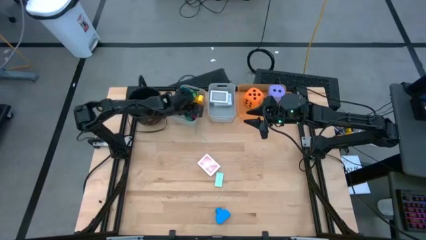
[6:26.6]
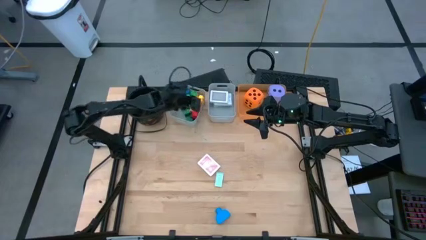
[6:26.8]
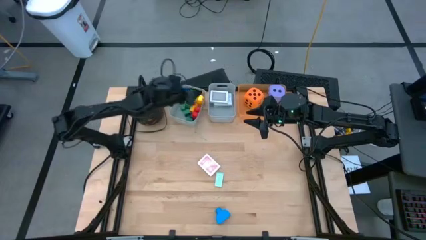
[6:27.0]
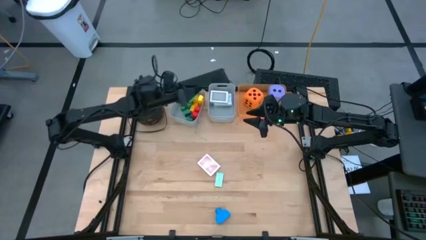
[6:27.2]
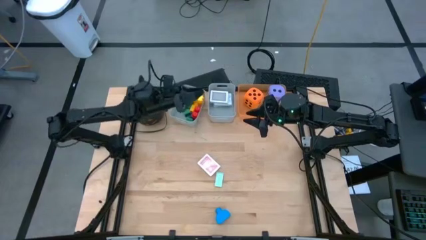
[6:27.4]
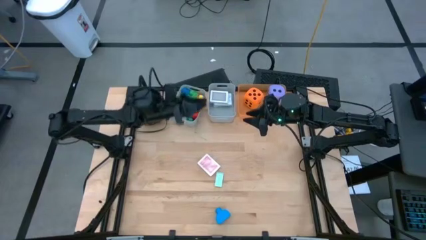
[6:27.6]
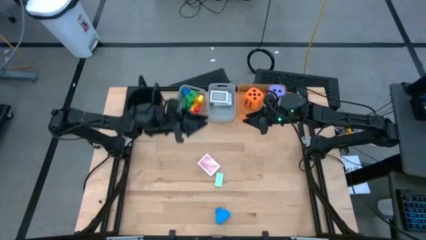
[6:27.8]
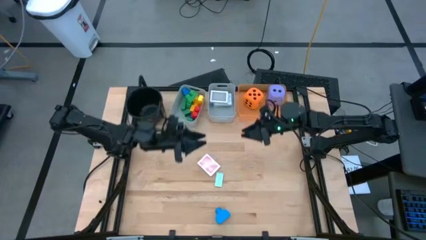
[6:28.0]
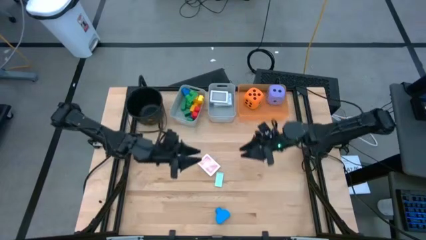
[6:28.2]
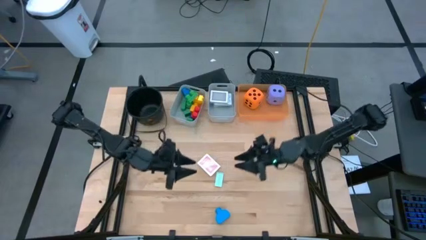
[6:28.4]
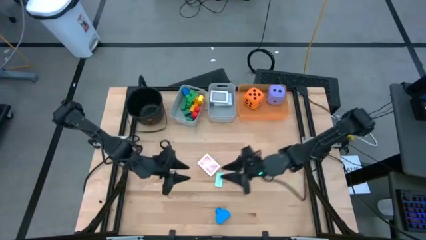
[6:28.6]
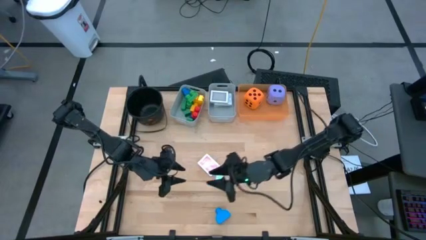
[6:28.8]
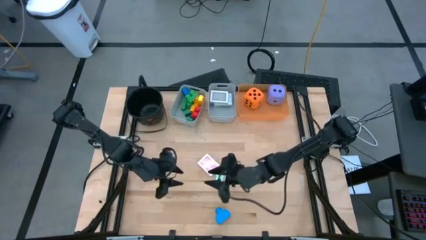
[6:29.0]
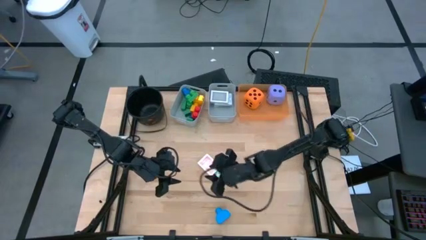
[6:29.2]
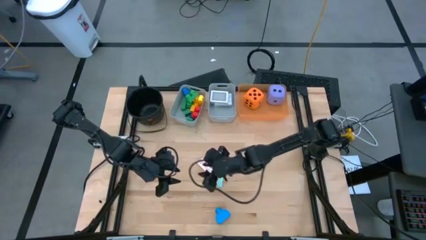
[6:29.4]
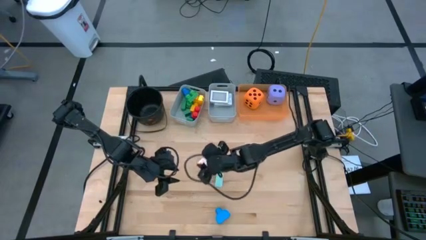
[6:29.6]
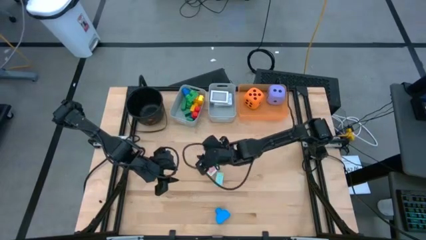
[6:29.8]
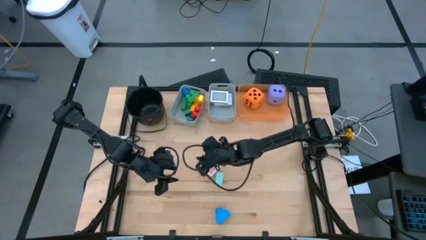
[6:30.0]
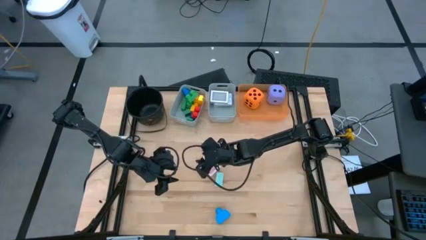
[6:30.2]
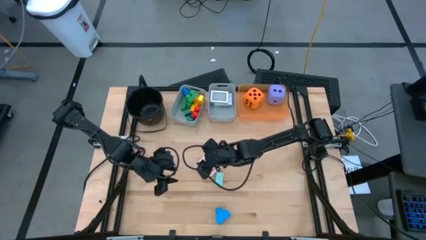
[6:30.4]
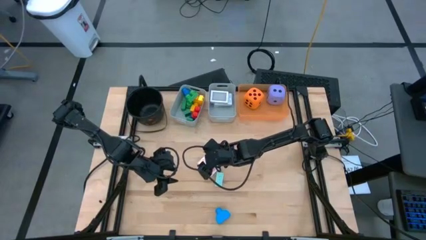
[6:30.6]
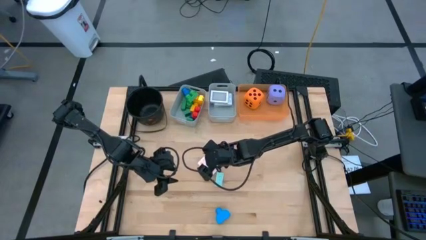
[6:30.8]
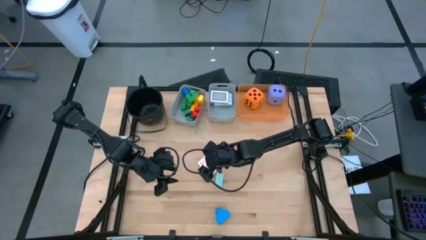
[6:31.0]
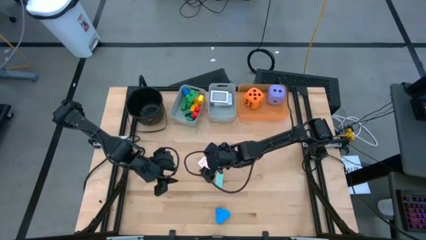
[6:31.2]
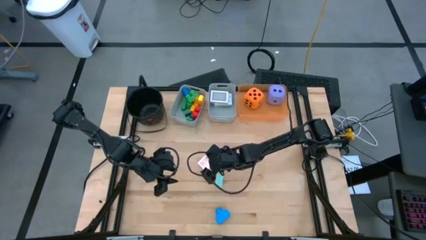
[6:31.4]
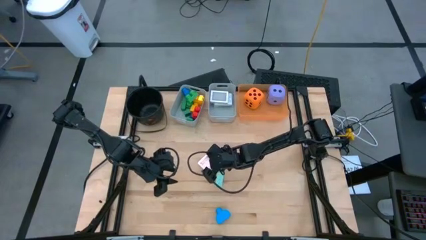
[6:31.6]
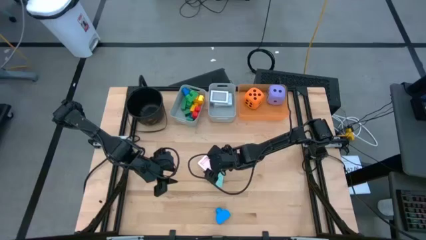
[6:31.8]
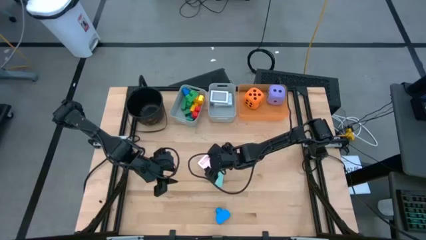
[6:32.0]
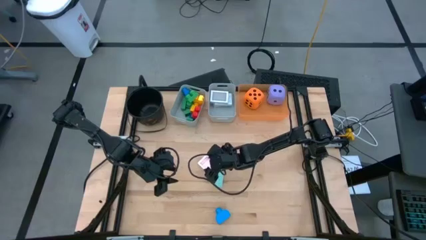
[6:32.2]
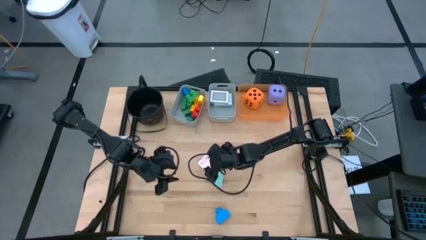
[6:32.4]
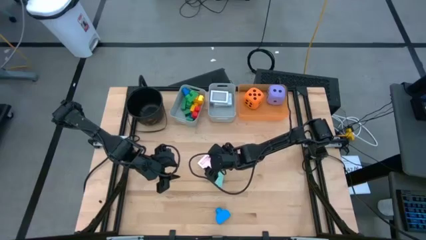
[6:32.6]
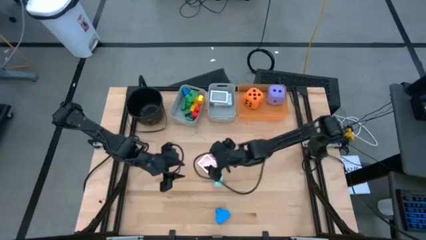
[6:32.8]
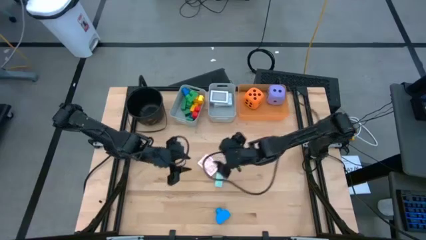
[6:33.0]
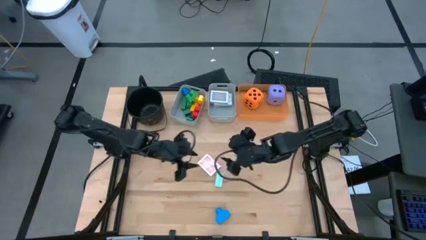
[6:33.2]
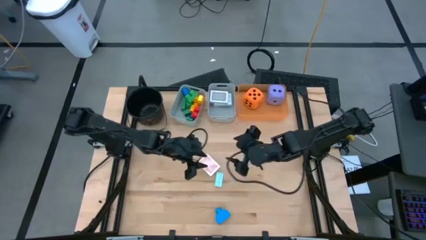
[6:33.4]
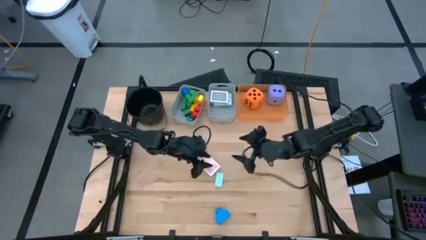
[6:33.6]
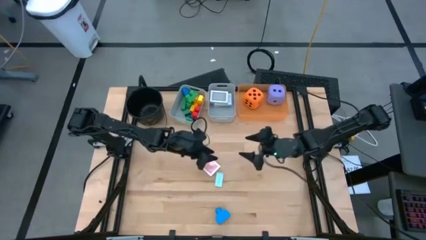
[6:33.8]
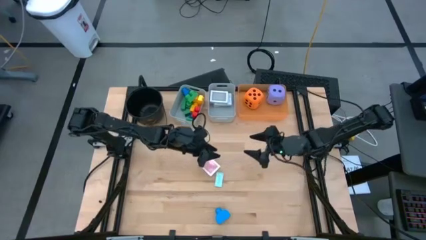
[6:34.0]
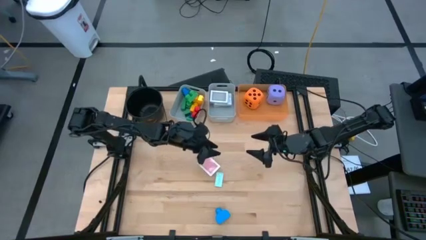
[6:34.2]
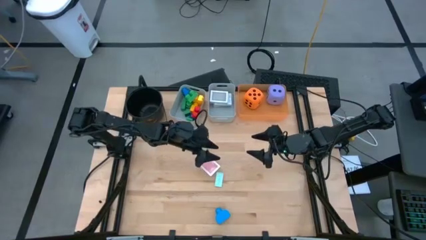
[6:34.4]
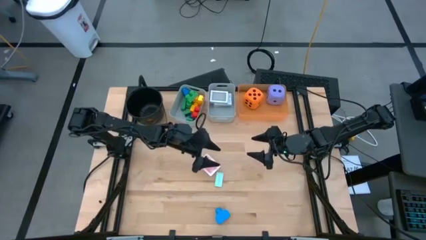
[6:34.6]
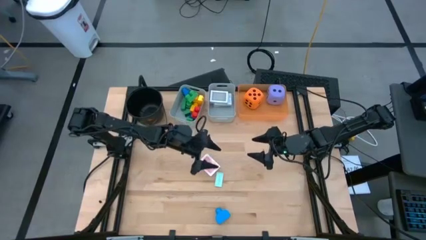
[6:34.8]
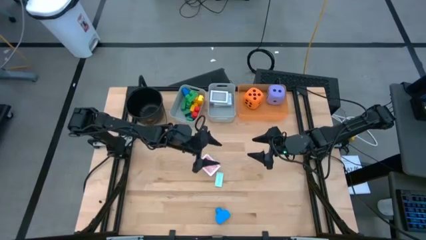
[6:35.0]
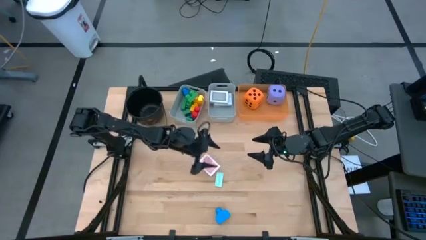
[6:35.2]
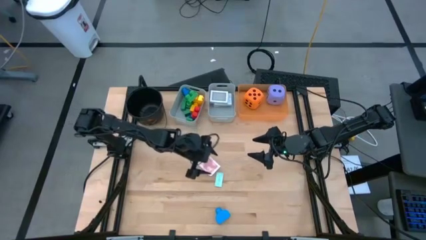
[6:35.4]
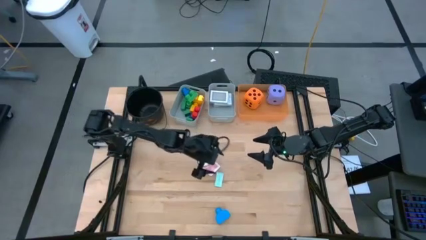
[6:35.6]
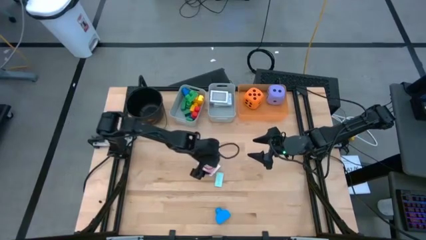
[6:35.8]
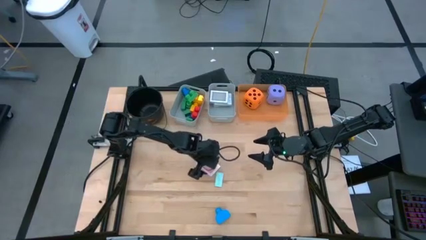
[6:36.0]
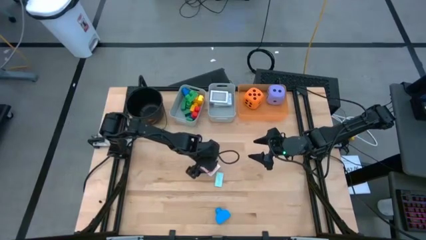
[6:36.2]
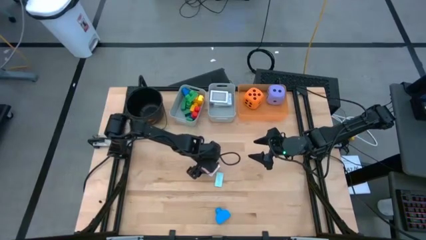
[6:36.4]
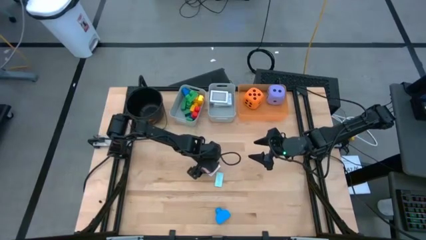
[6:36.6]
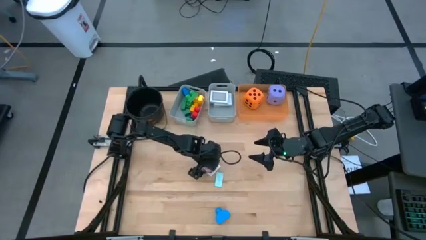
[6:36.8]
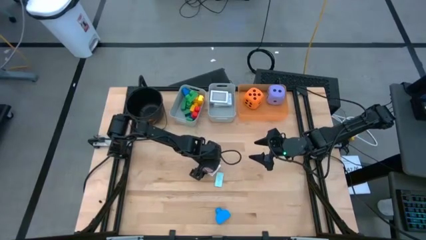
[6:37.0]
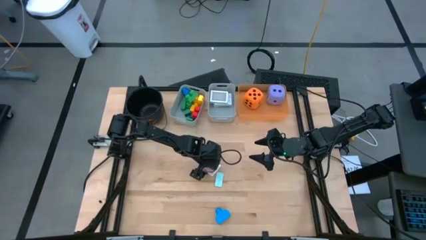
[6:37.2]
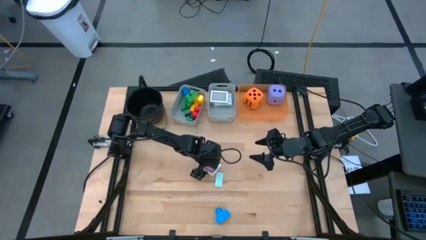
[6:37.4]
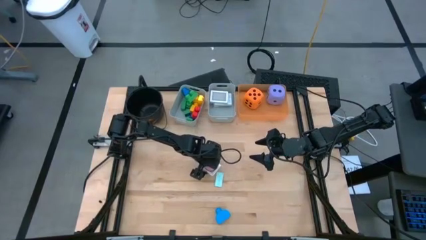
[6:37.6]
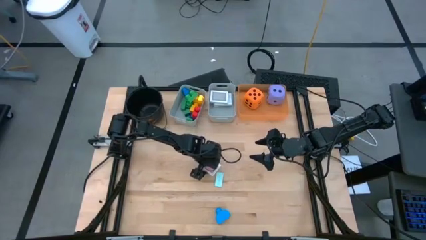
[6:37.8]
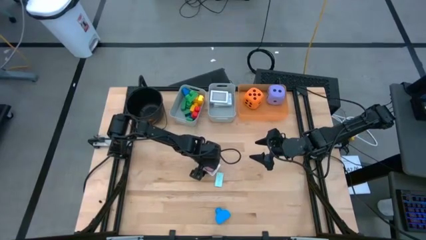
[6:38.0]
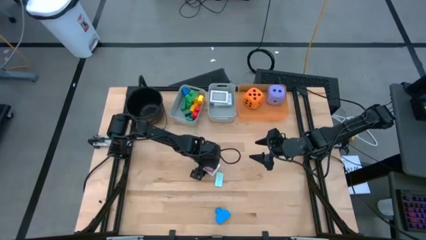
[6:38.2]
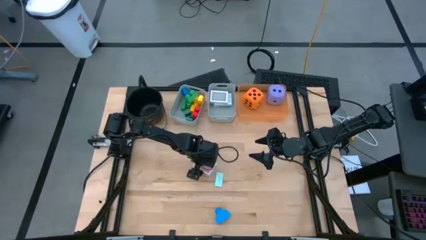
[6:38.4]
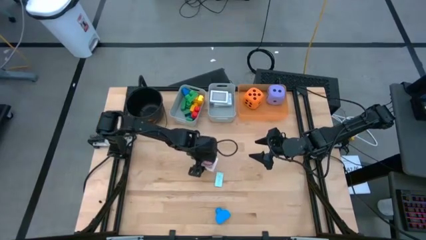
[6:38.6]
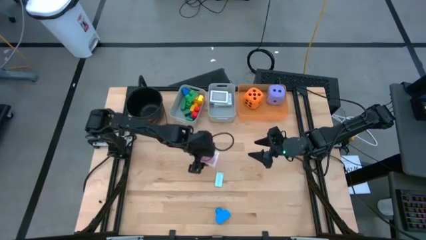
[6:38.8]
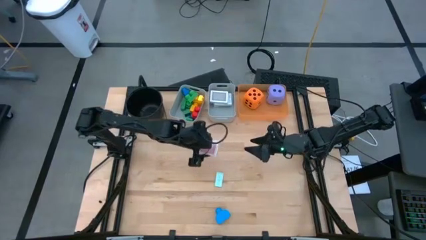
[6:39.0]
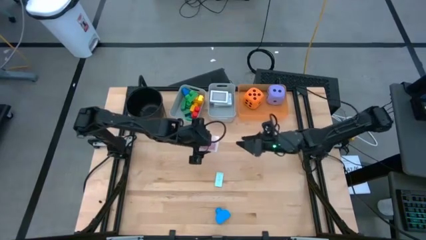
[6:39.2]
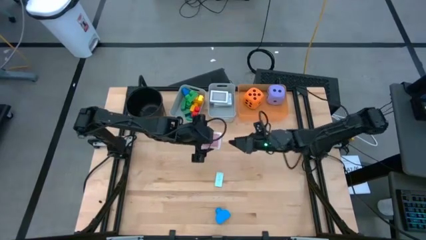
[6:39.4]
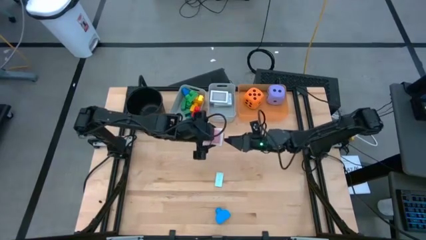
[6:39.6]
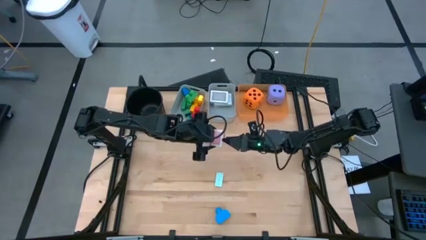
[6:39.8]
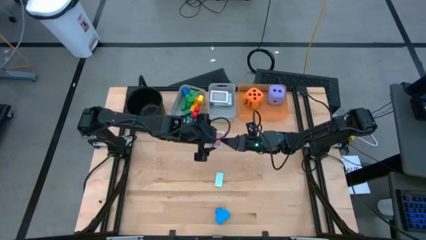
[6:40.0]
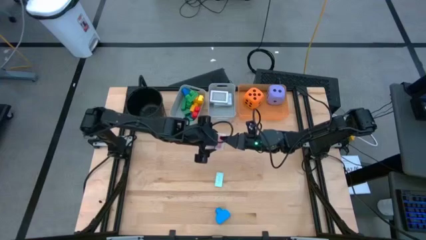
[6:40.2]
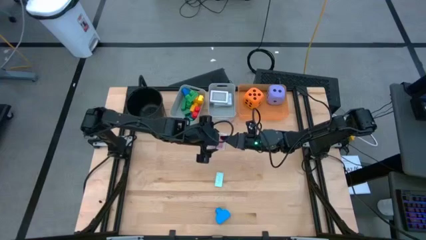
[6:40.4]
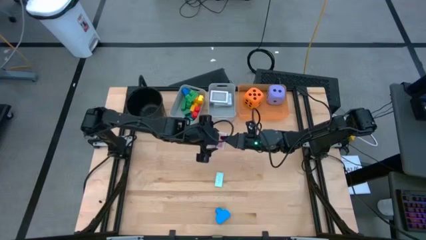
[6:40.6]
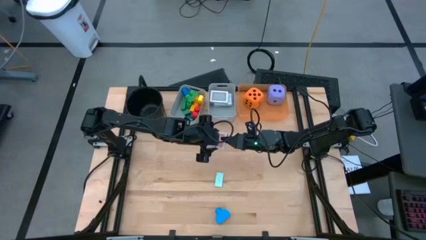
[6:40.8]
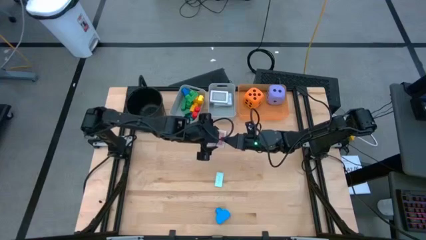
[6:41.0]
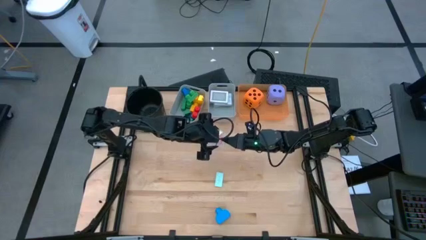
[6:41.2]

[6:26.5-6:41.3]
Task: Pick & Place Toys
Put the red deck of cards into the right gray bin
